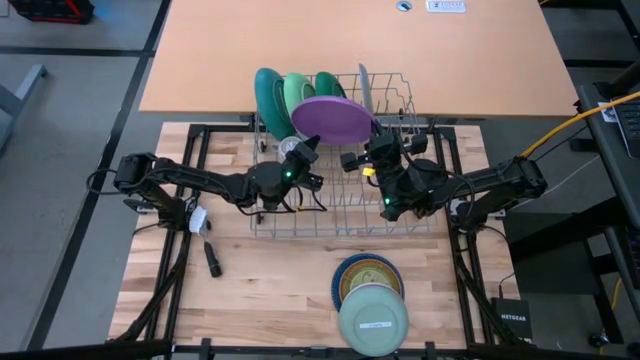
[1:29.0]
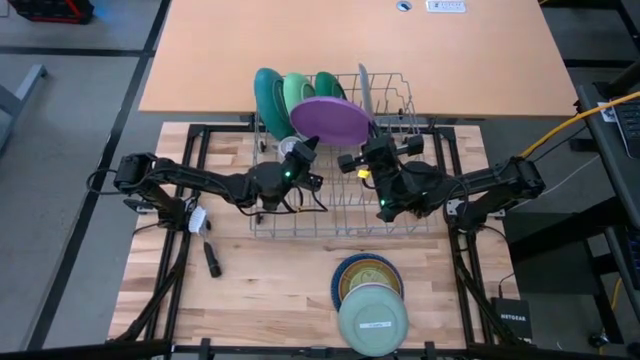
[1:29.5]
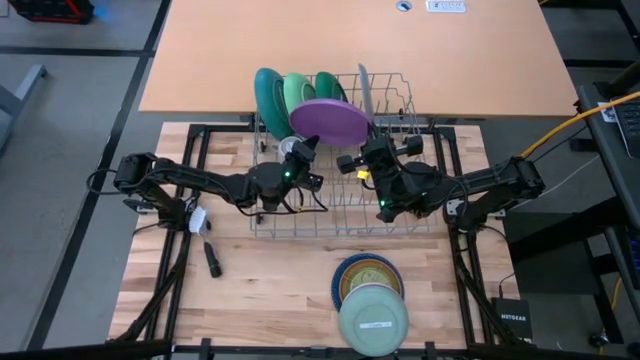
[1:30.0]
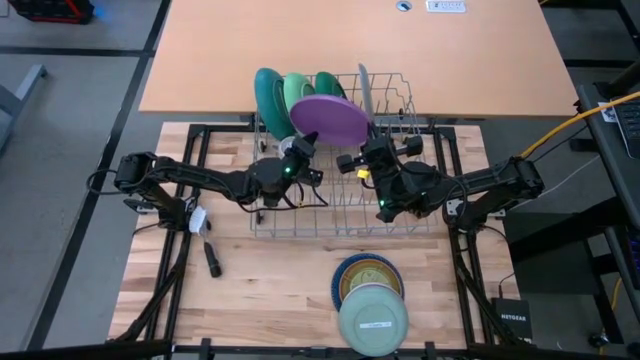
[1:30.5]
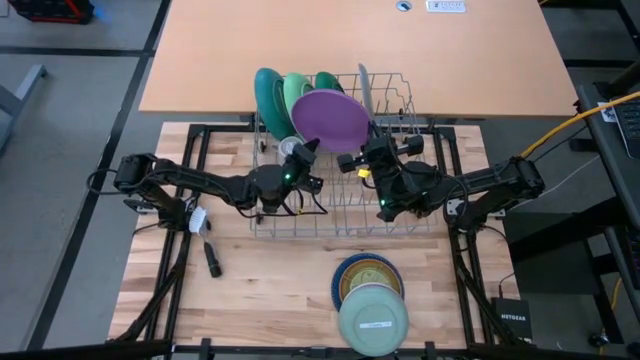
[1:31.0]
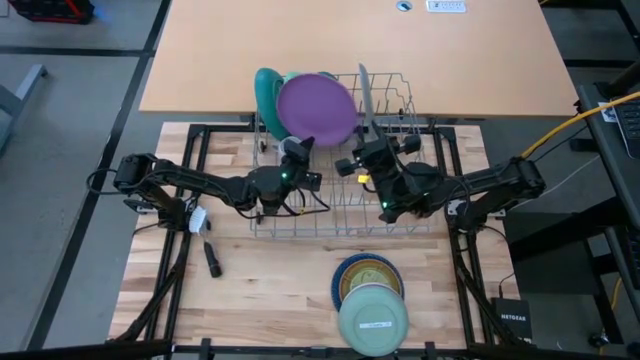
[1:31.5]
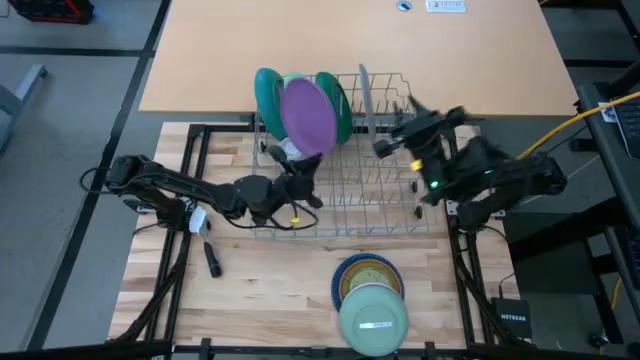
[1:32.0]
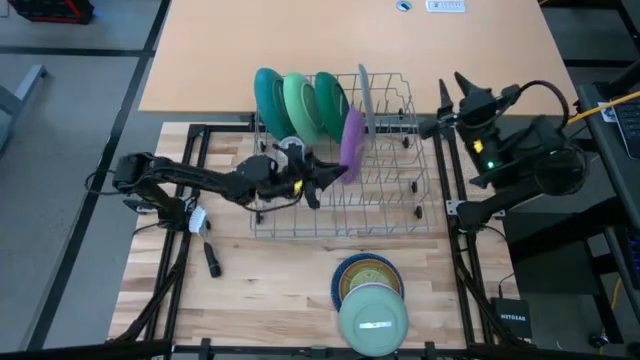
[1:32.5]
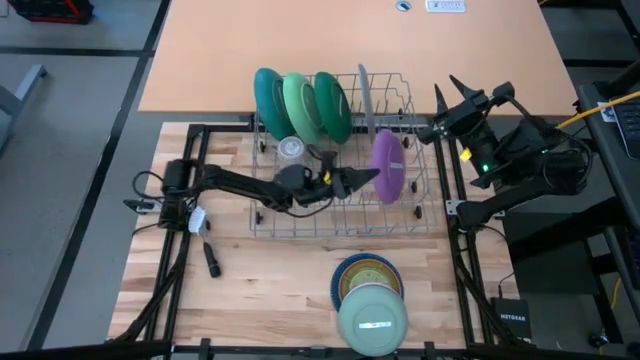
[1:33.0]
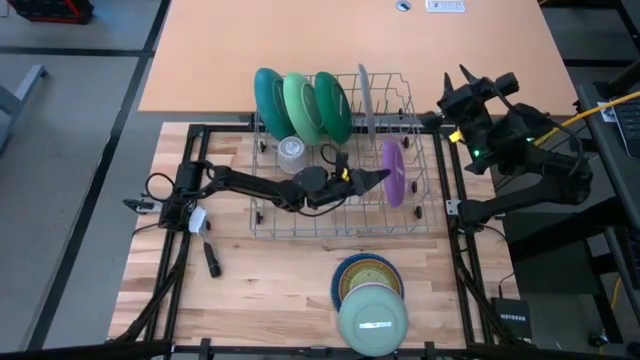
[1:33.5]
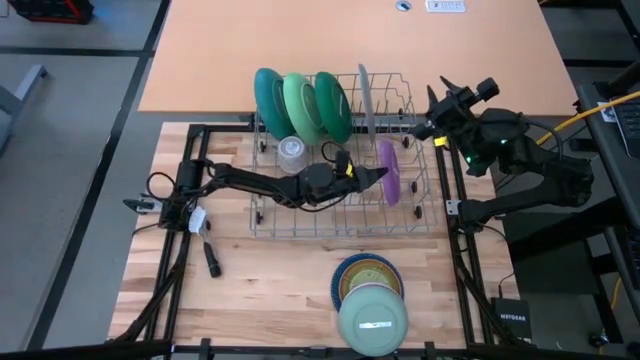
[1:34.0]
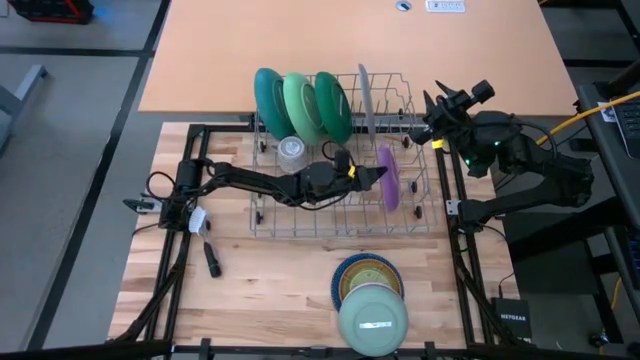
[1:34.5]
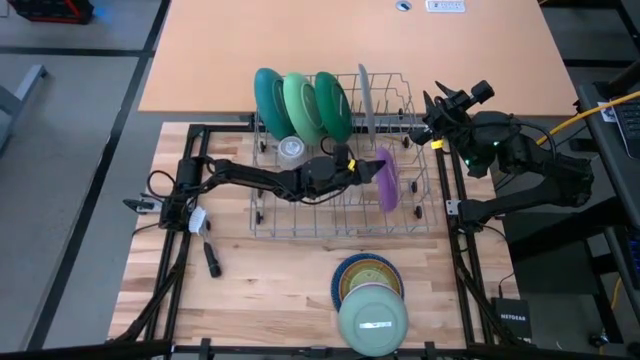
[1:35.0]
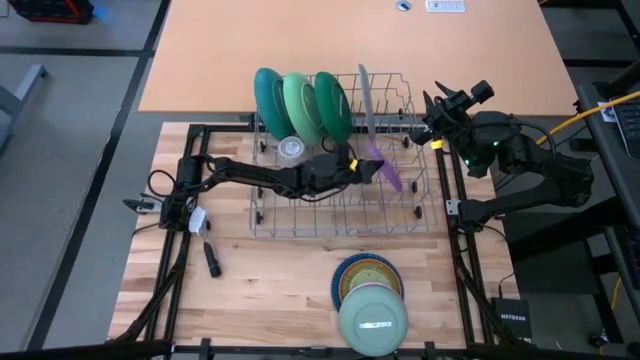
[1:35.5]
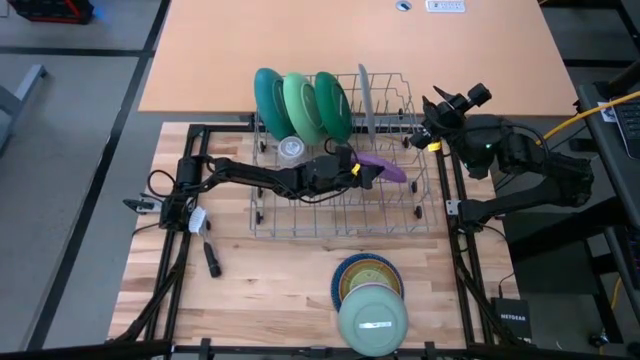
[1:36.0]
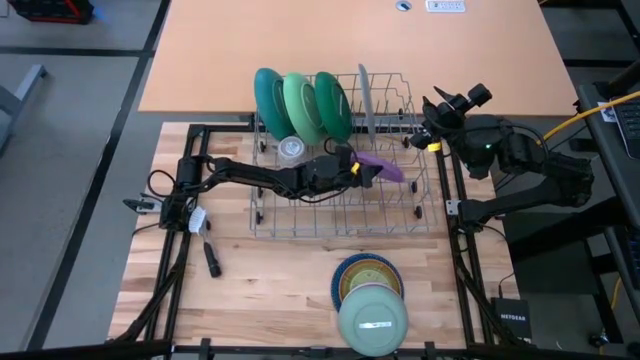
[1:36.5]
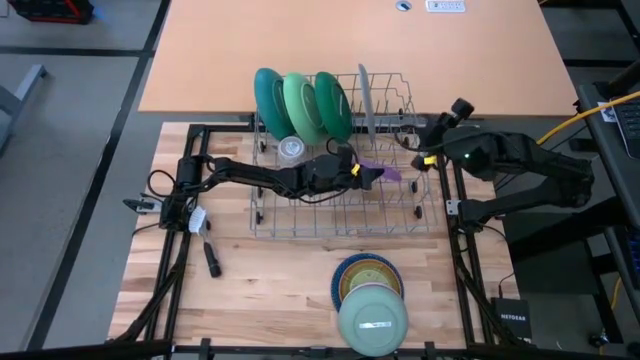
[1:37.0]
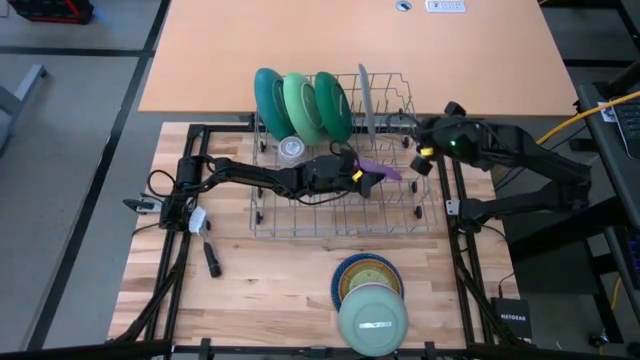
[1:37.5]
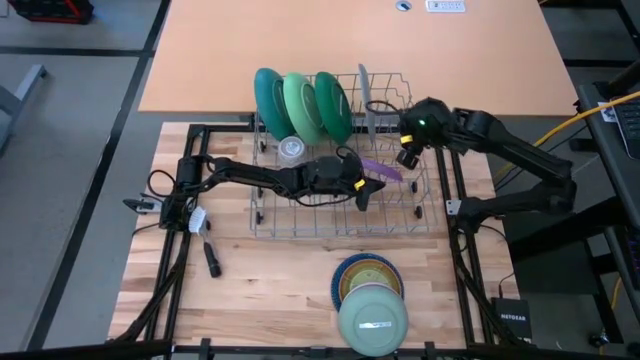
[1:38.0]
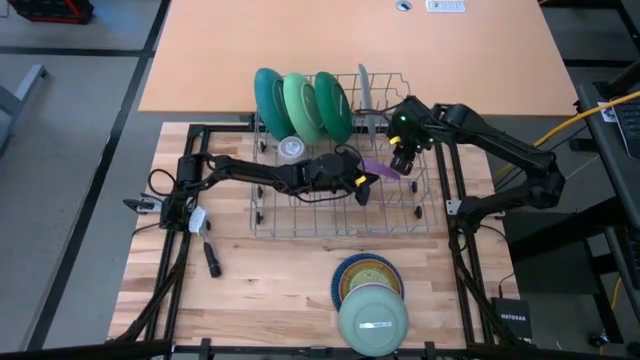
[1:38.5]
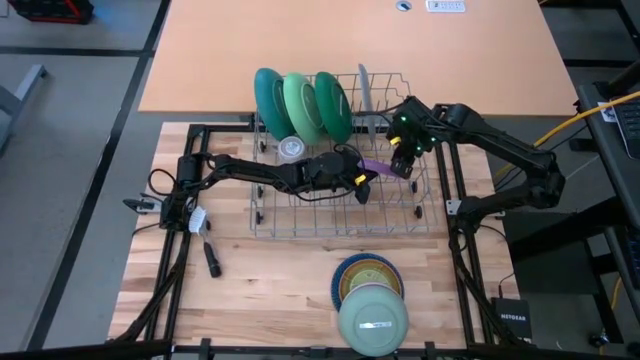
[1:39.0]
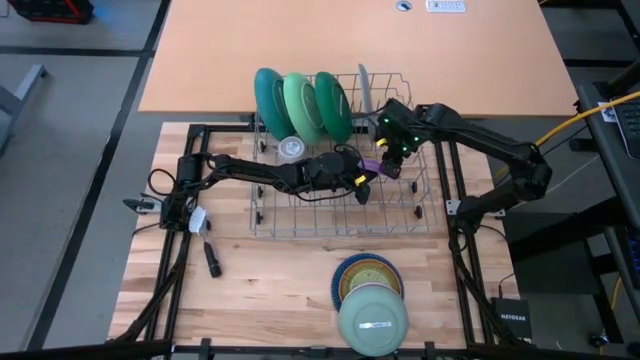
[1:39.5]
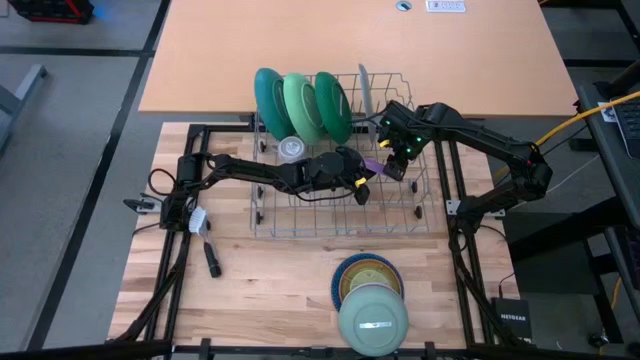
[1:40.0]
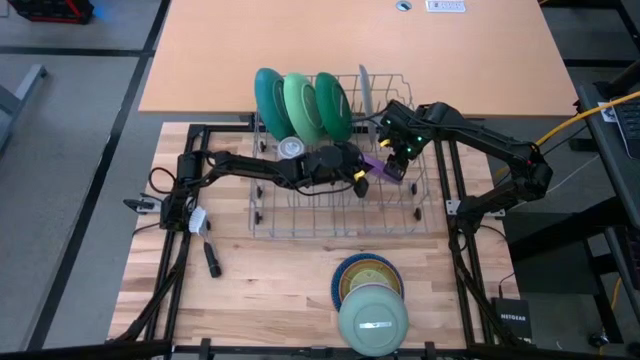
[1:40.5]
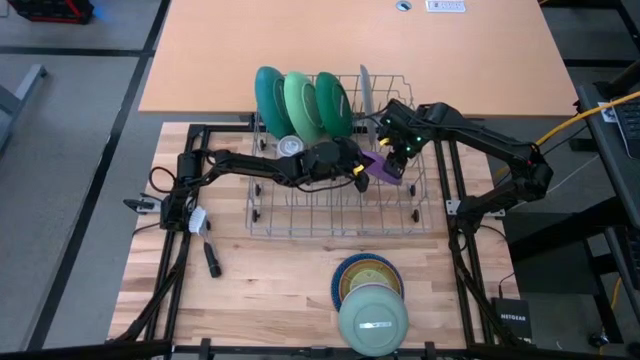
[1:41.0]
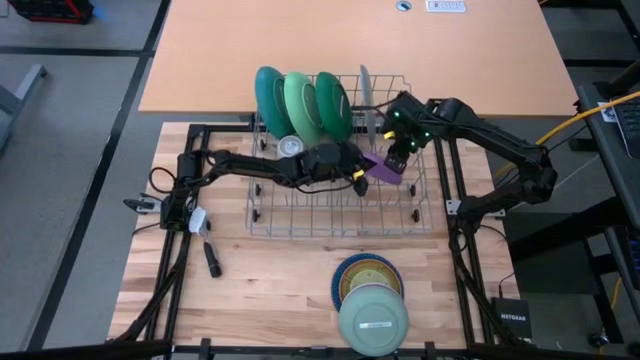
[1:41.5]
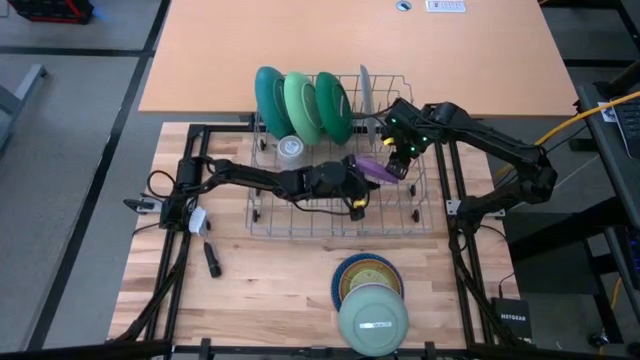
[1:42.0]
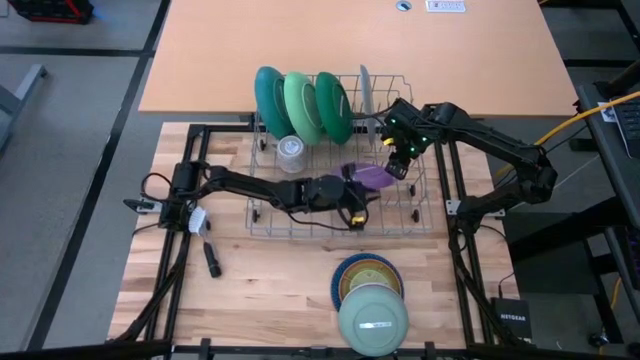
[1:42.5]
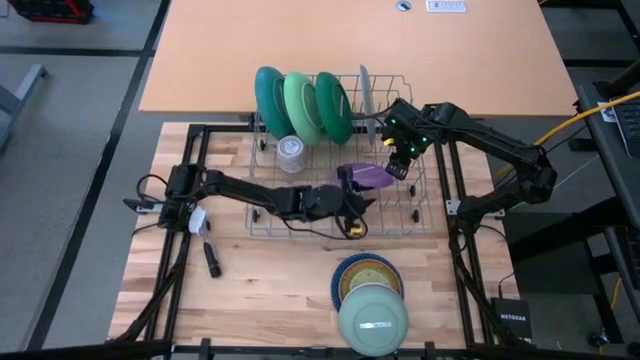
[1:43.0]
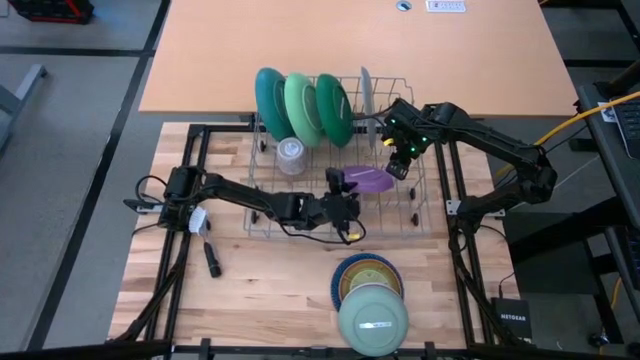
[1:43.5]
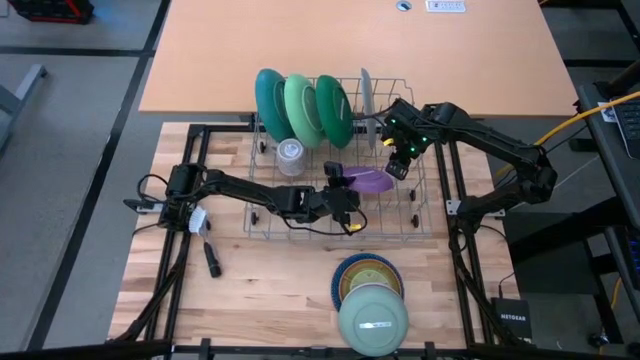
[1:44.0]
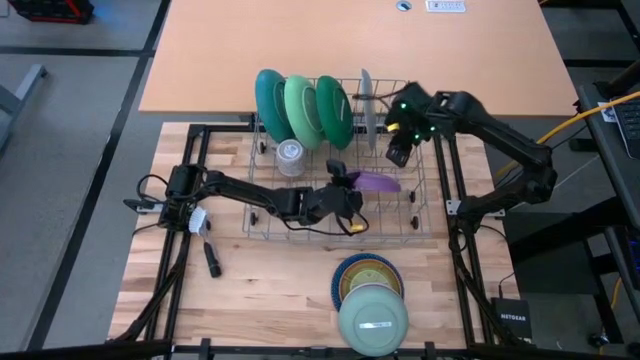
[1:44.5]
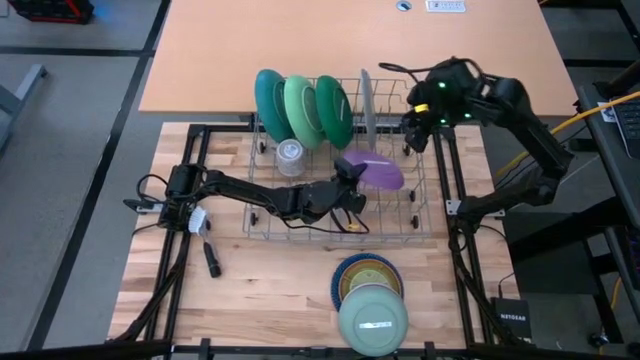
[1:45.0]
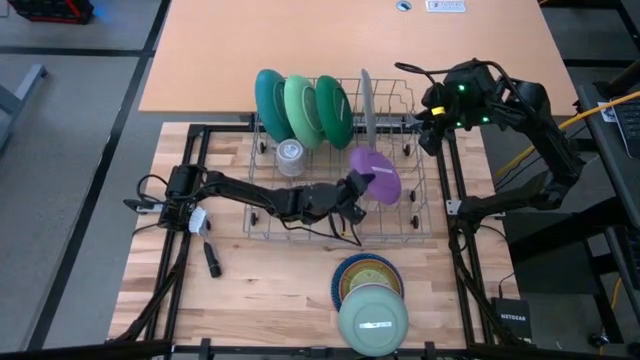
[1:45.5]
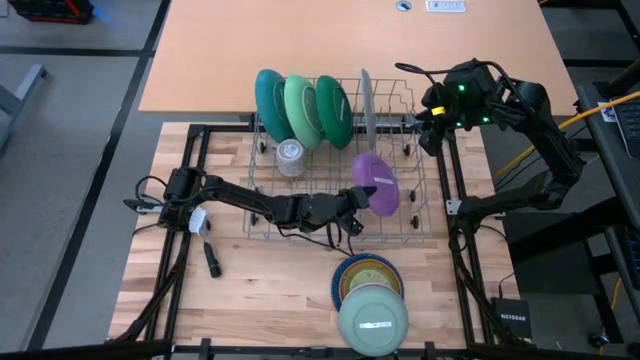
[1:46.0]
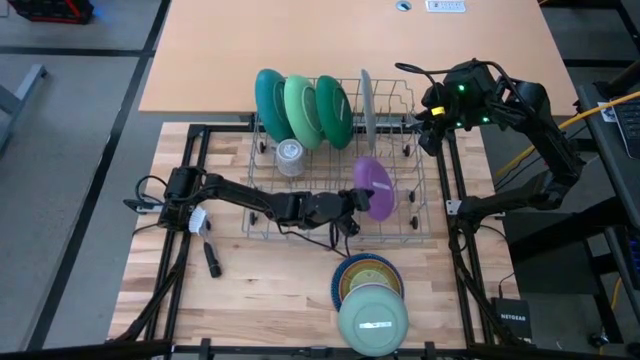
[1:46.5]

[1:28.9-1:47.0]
Task: Sort dishes
Put the purple plate in the dish rack

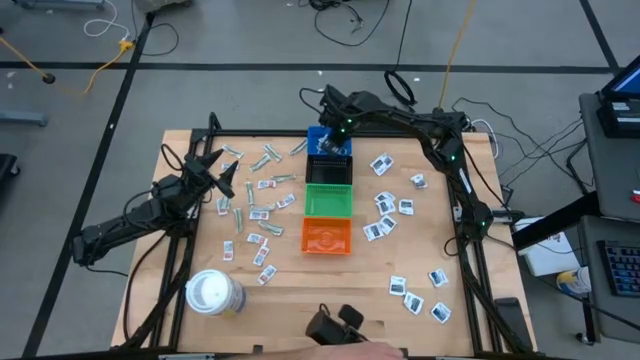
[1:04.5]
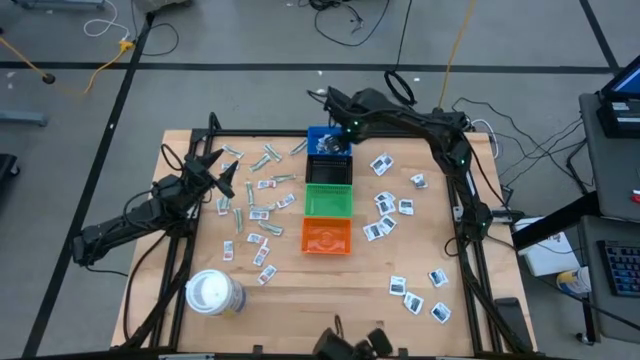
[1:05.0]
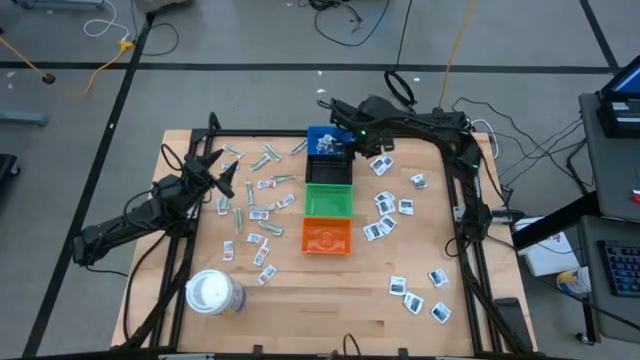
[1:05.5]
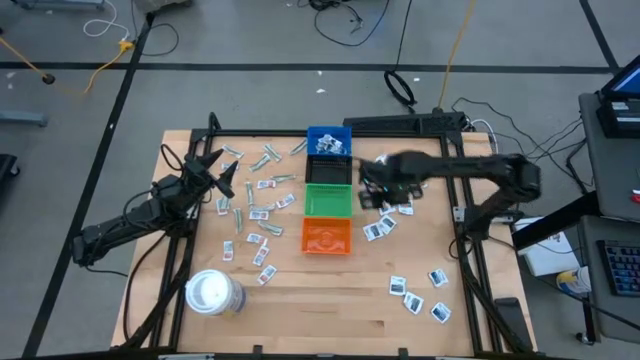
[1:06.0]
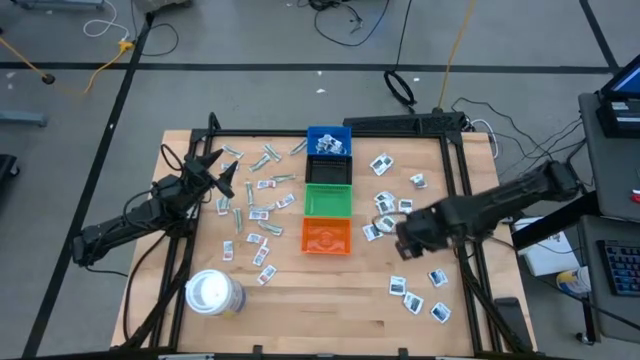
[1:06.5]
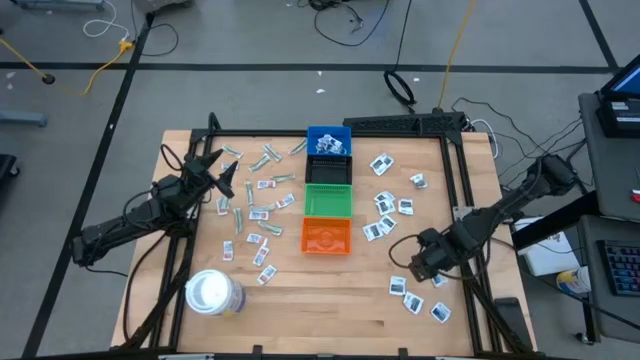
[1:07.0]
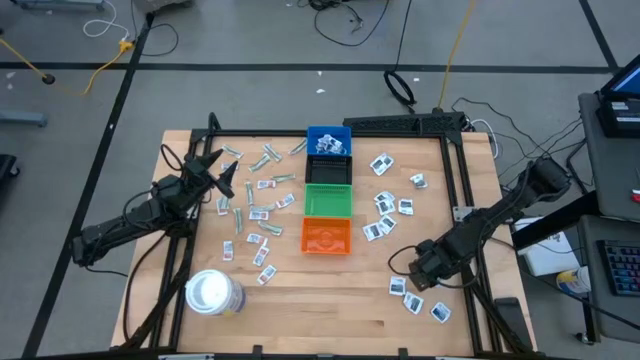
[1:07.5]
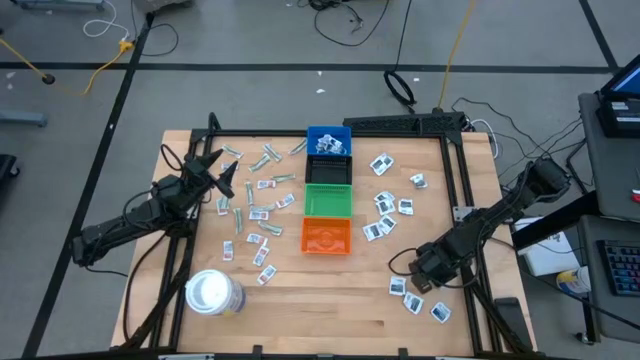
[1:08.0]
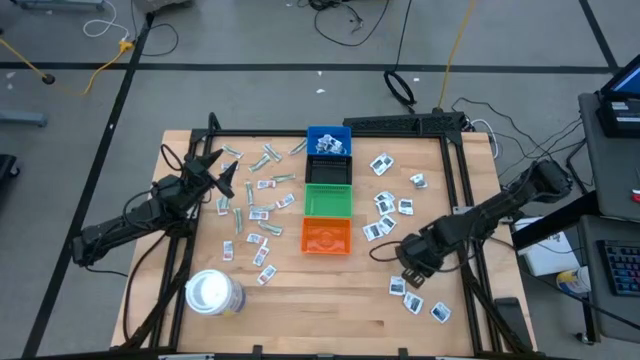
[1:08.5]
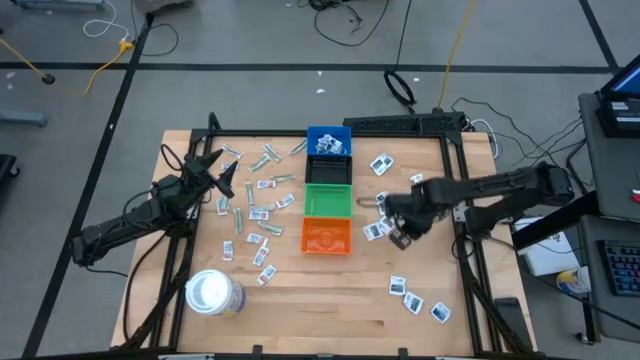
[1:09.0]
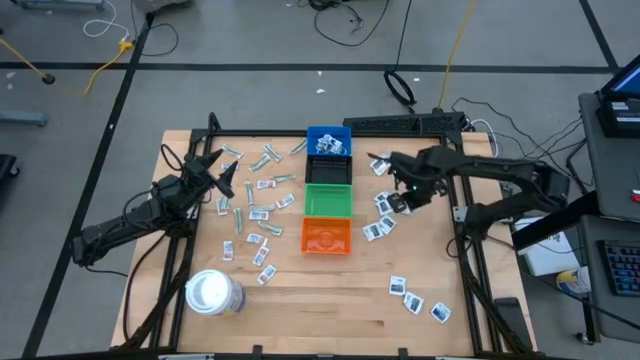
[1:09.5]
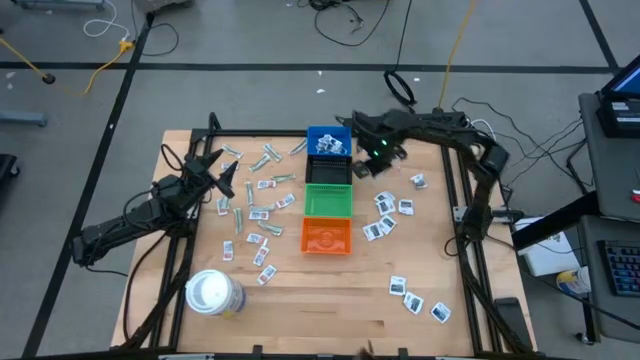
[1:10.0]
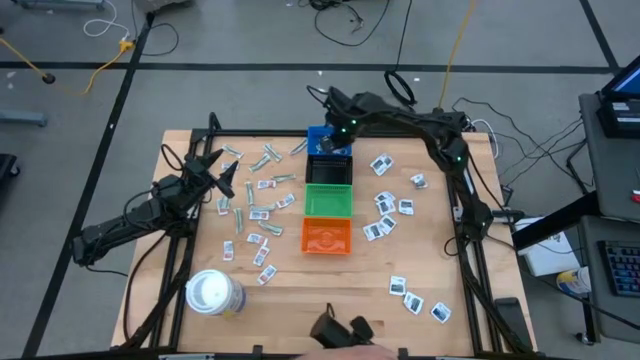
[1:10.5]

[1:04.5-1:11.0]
Task: Pick & Place First Aid Supplies
Put the blue alcohol pad into the blue bin
